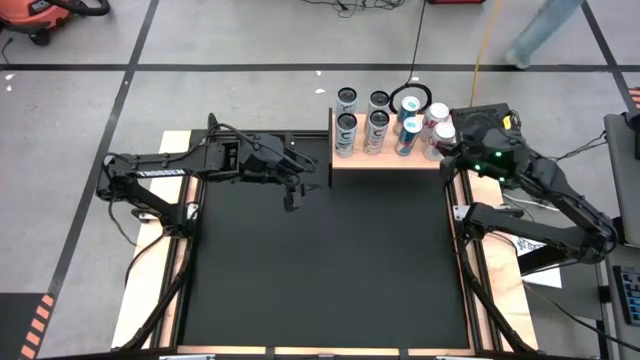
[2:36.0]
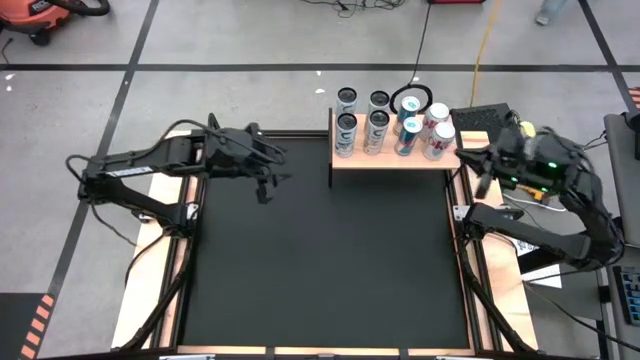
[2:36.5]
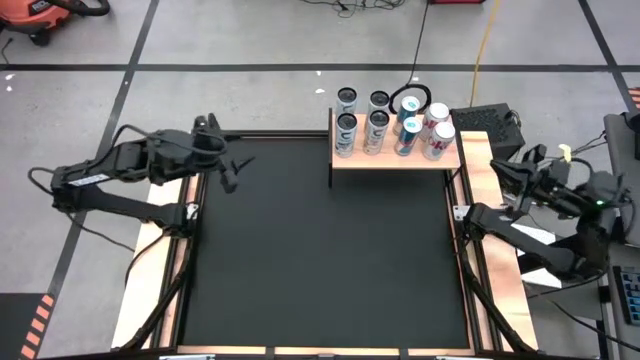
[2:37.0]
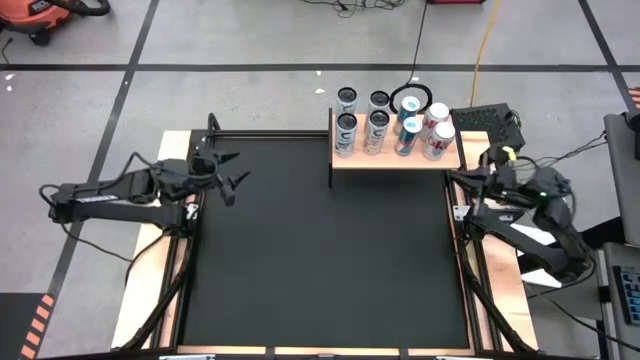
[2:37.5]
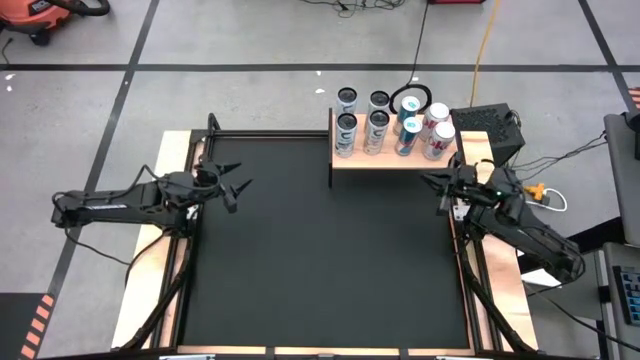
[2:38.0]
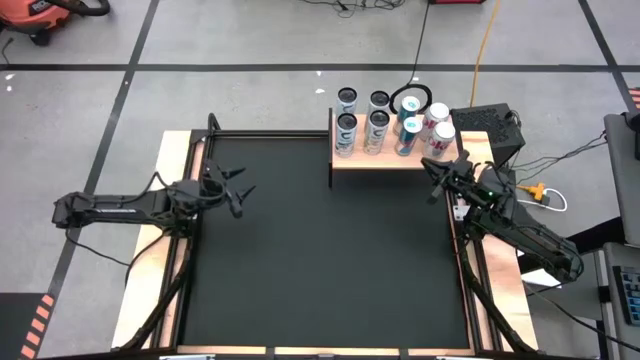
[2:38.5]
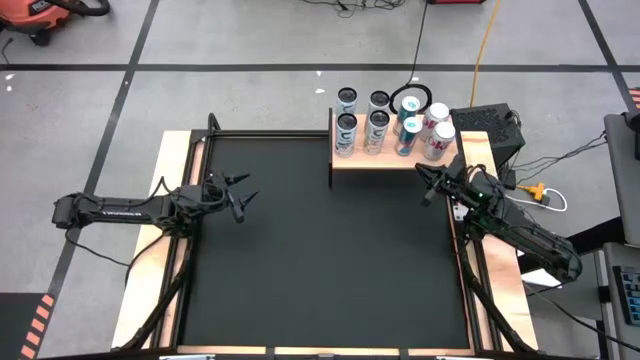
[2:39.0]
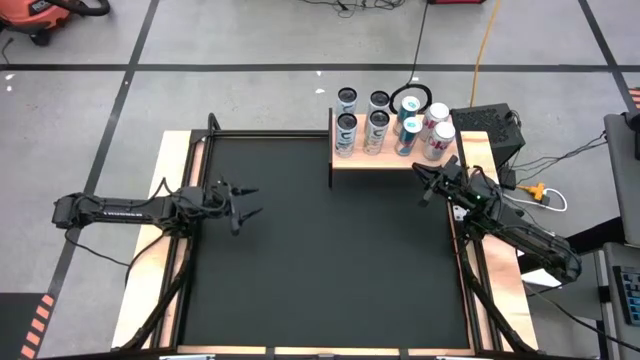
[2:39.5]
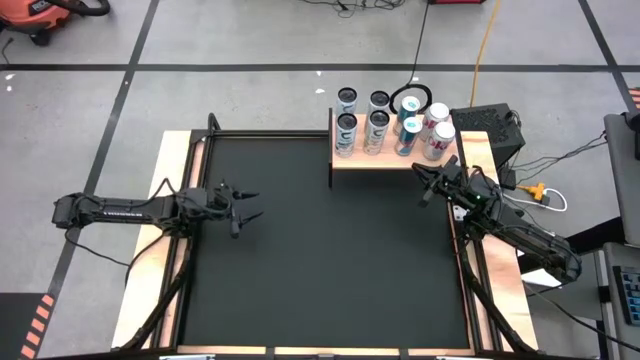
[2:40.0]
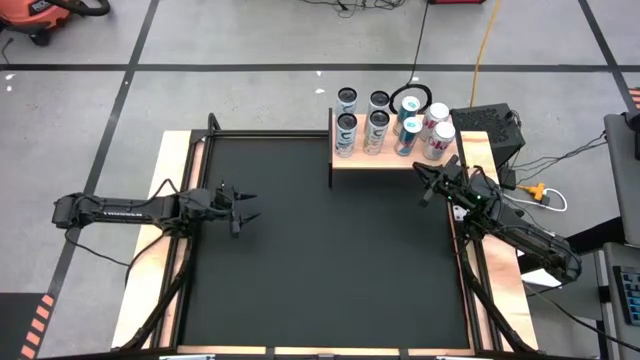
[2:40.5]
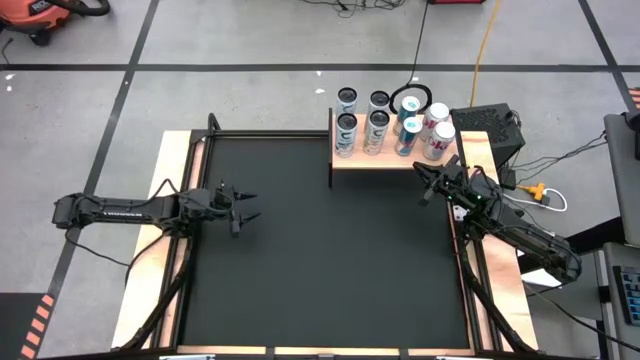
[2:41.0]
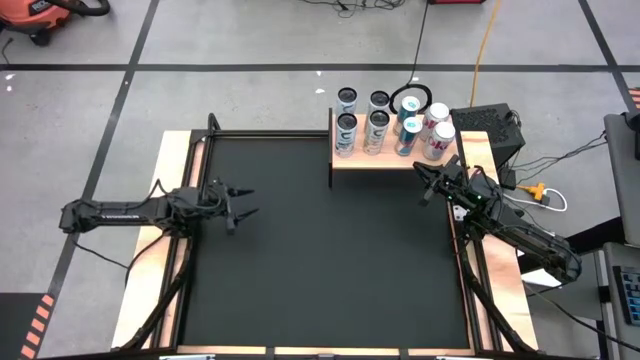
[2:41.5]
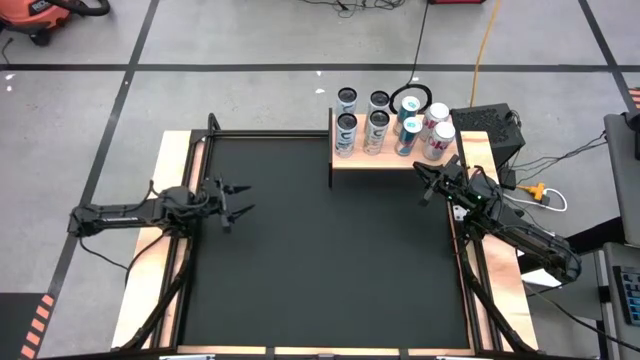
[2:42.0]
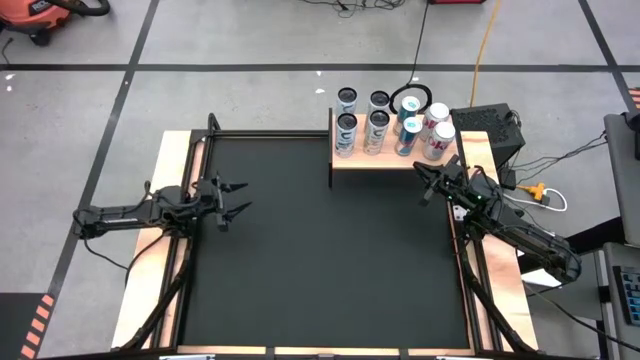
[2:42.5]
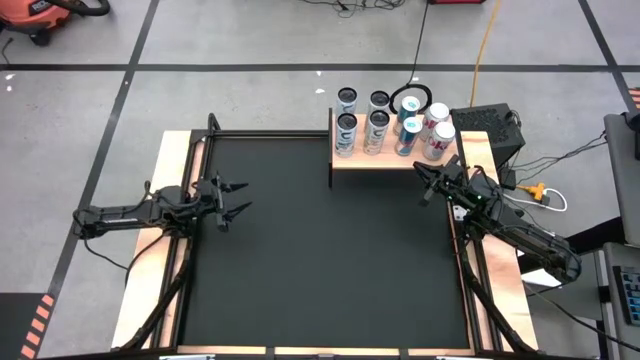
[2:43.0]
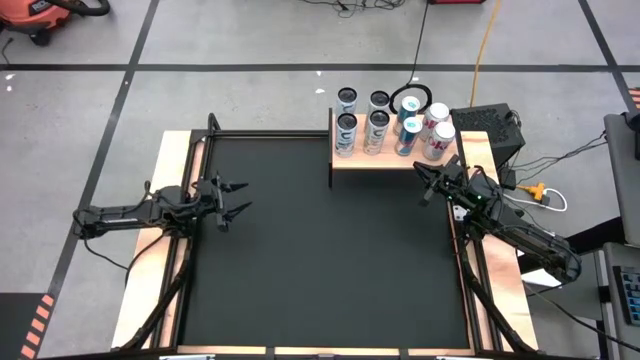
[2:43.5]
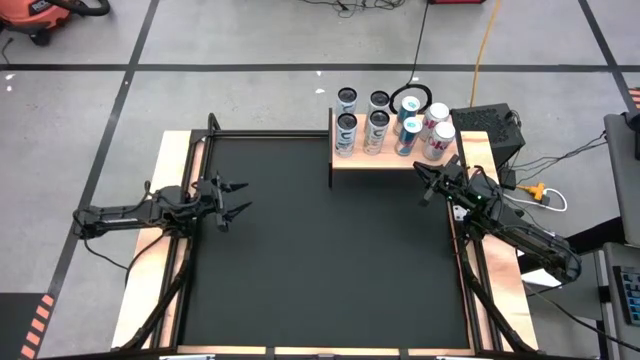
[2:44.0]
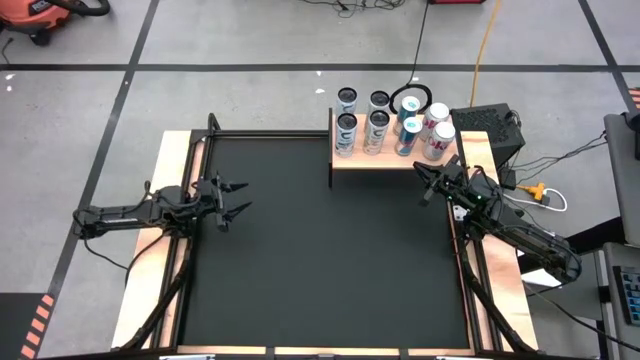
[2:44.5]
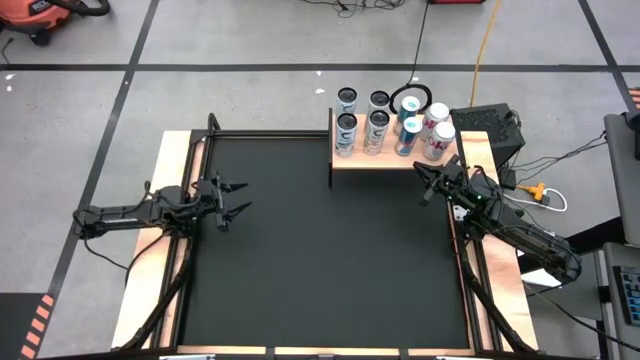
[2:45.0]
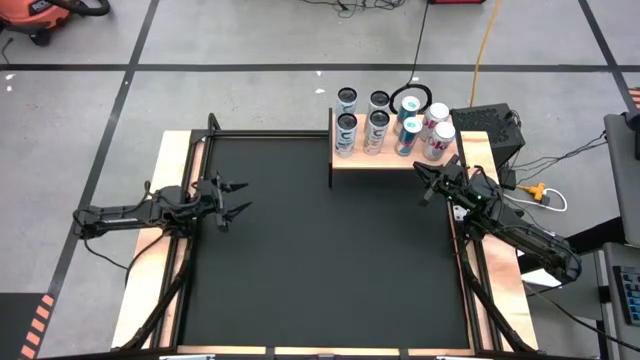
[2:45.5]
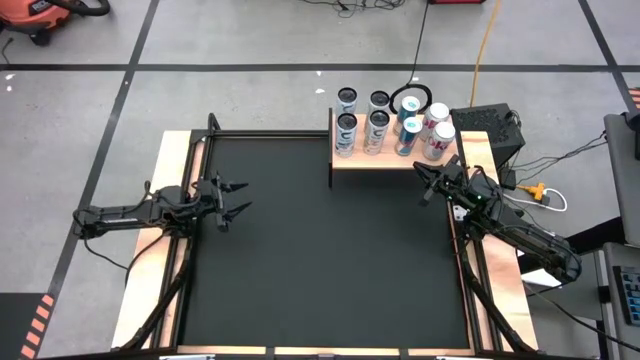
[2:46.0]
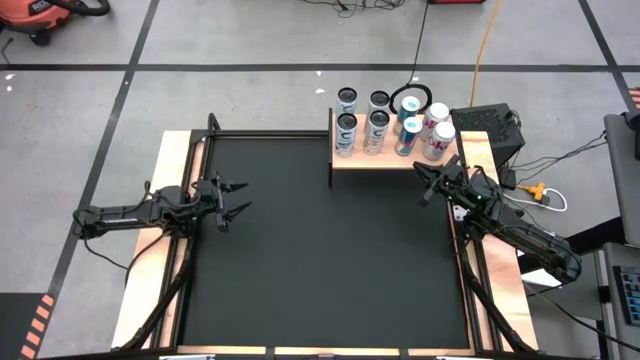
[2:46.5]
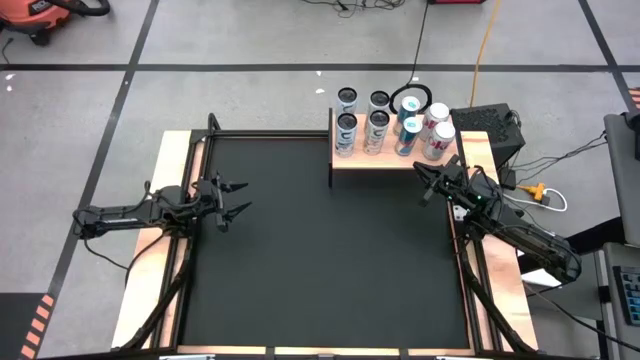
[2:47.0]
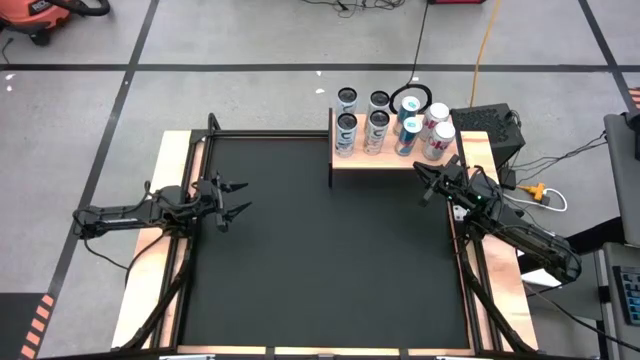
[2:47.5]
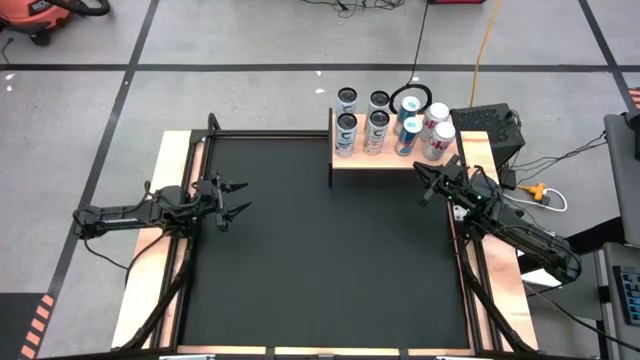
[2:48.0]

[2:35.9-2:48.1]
Task: Place canned beverage on shelf
Return to Home Position

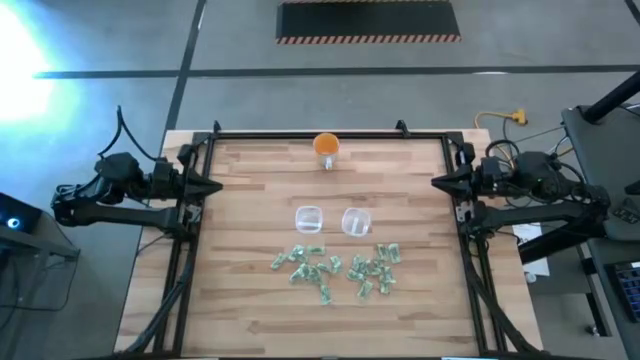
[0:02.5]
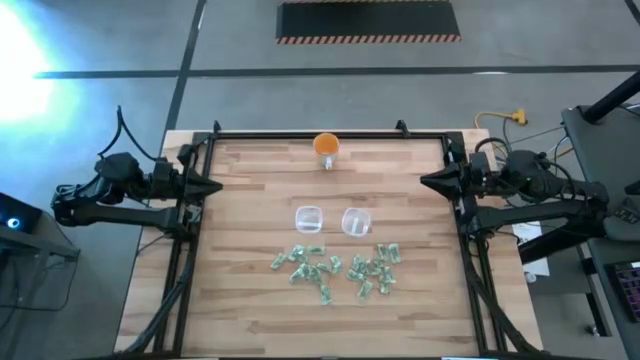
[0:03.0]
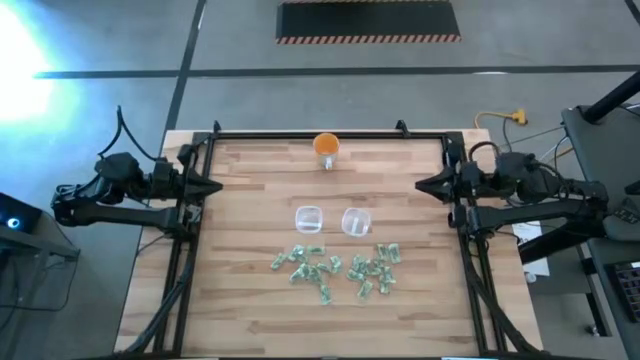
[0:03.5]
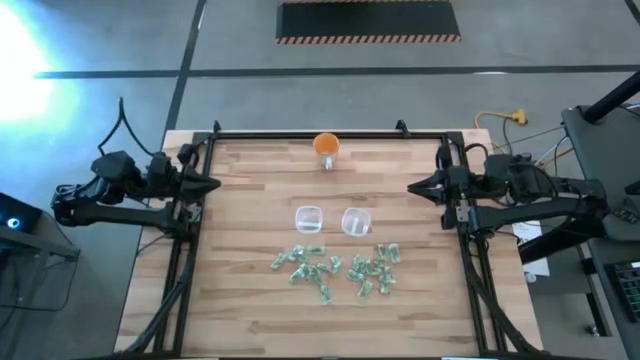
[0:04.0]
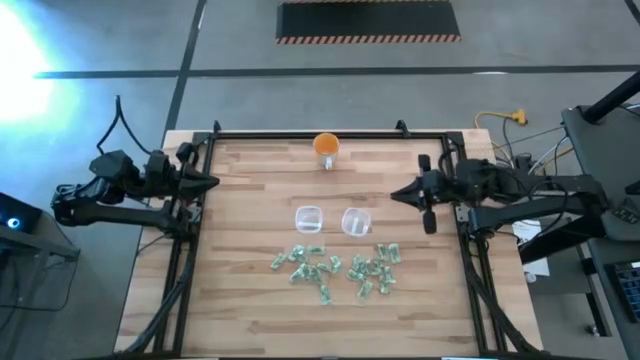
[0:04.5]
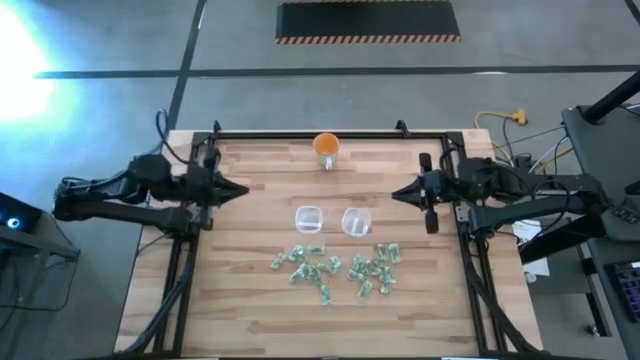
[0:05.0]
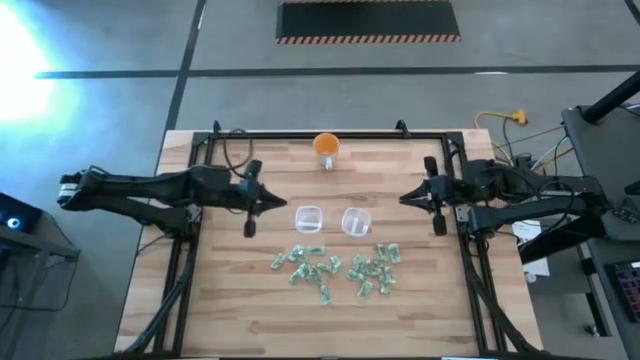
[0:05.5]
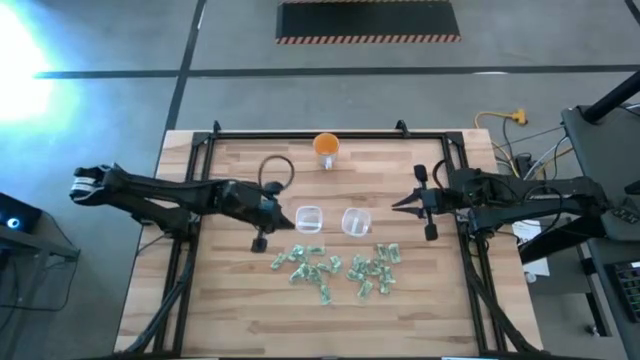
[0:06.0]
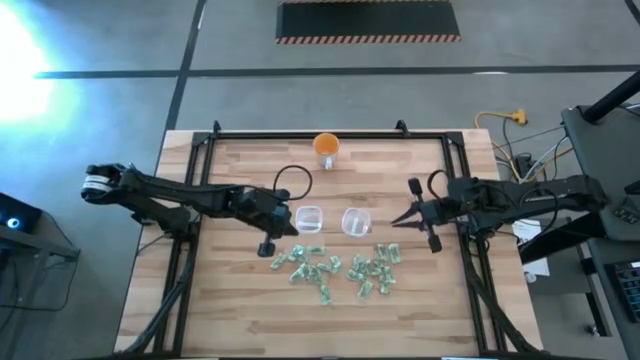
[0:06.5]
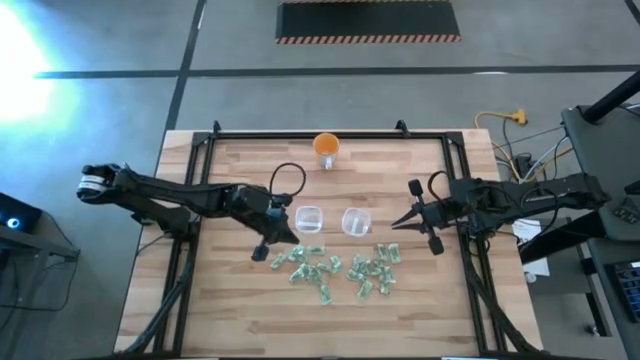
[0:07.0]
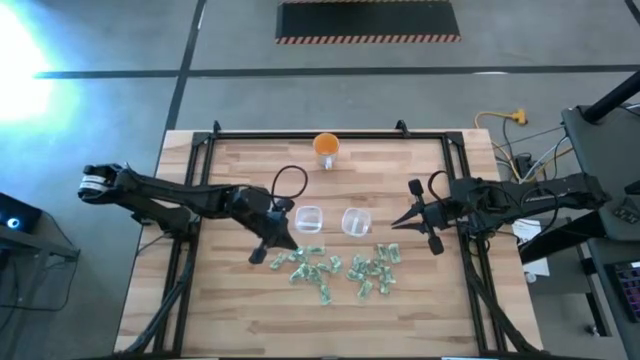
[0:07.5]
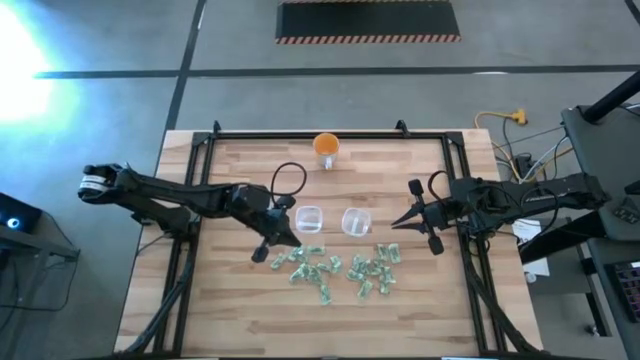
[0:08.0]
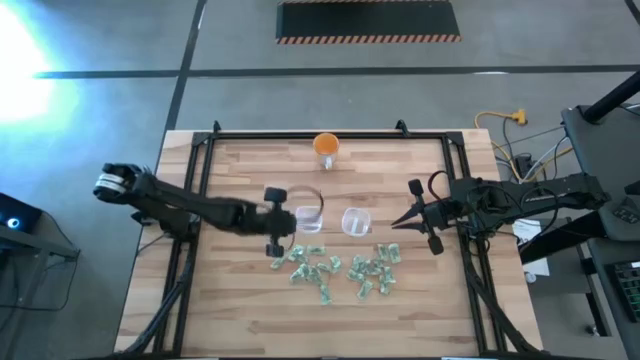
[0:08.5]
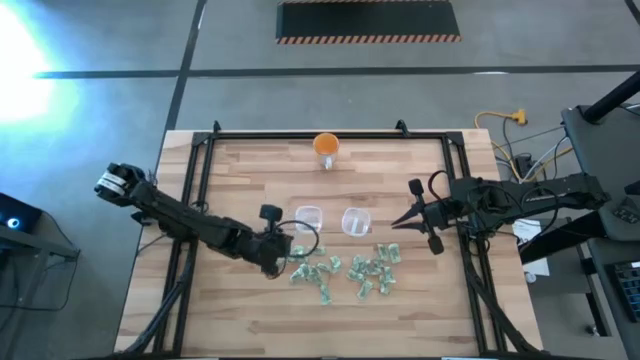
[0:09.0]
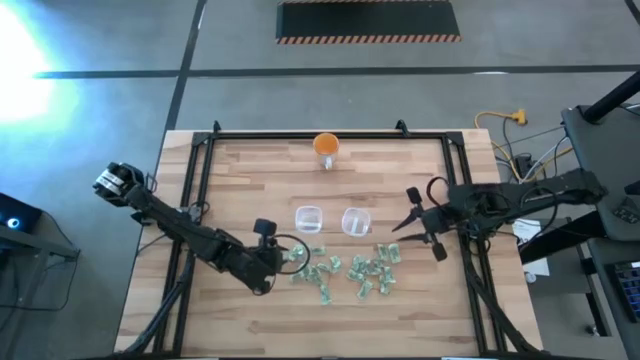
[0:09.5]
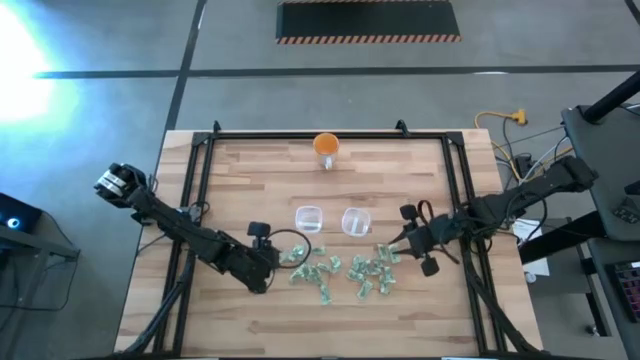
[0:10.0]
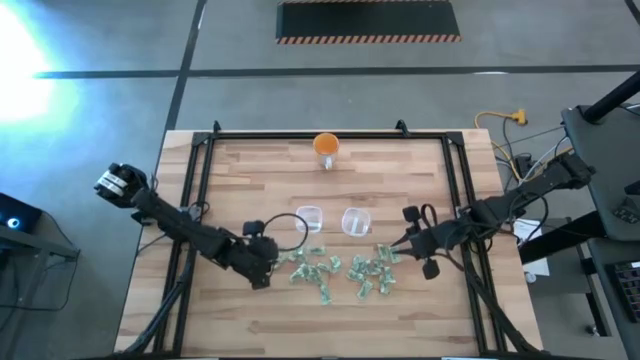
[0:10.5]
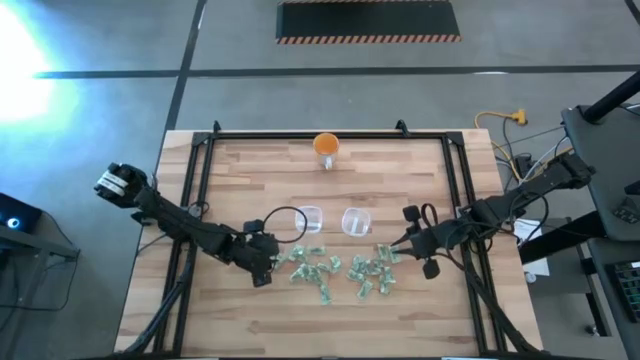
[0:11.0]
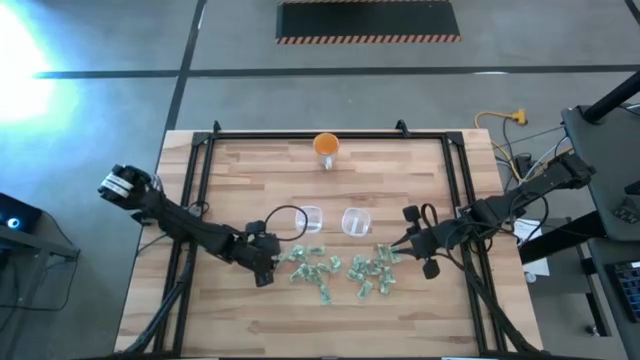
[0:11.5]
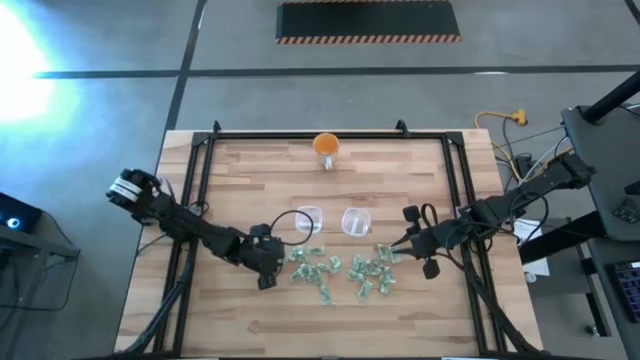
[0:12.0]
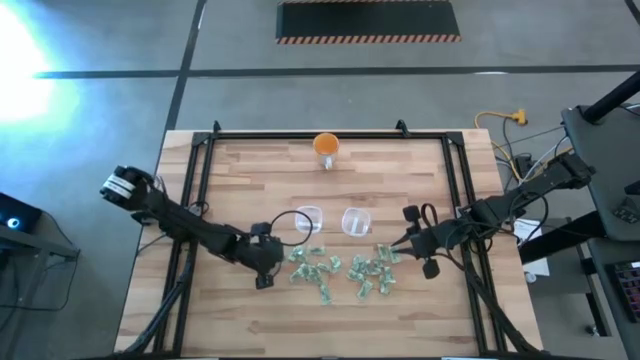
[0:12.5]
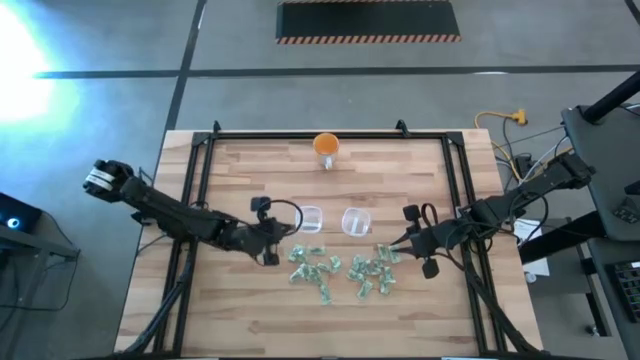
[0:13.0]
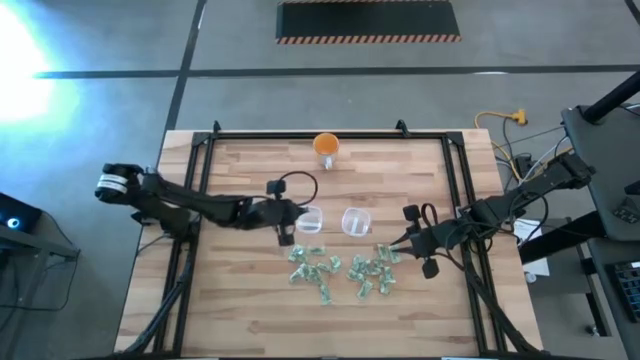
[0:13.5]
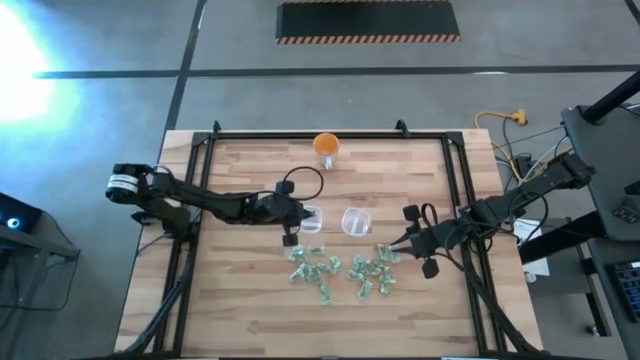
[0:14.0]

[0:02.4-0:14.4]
Task: Pick and place Stevia / Truvia into bins
Put the green stevia packet into the left transparent container
